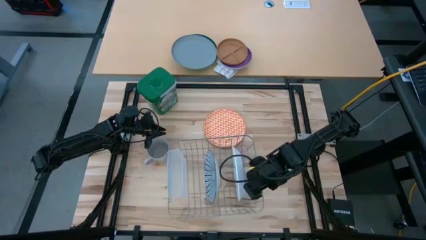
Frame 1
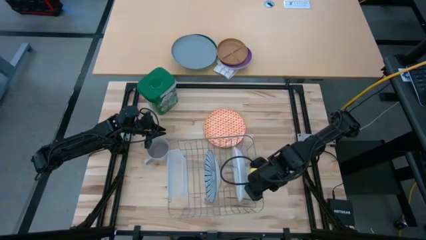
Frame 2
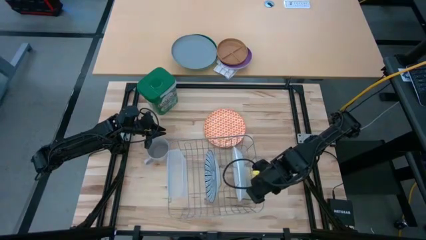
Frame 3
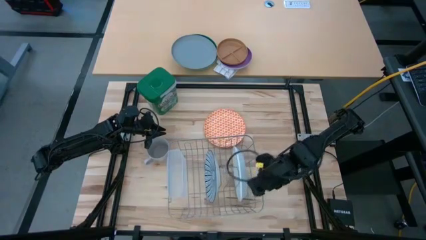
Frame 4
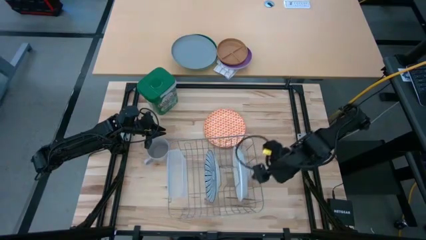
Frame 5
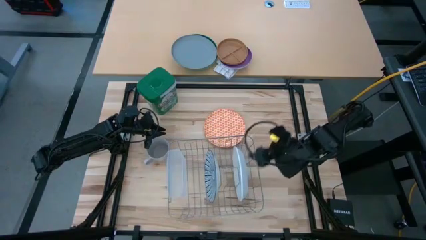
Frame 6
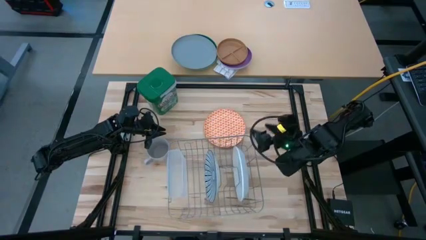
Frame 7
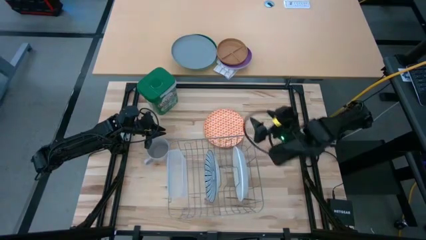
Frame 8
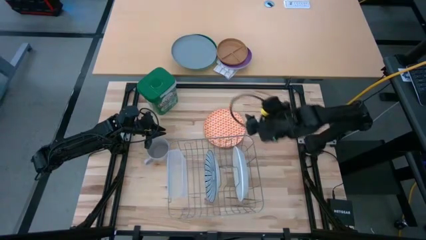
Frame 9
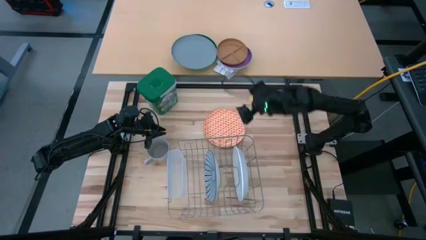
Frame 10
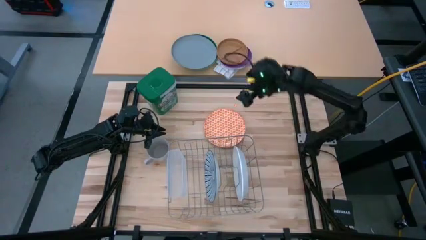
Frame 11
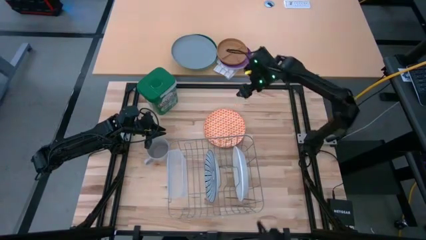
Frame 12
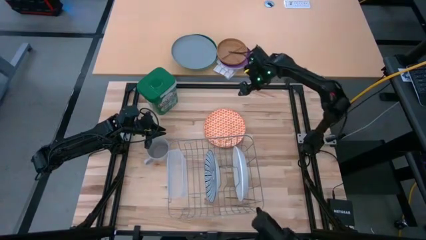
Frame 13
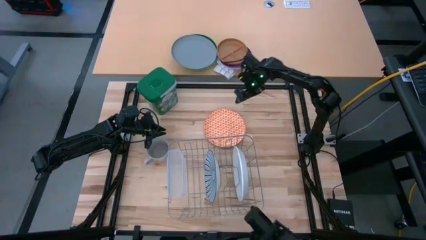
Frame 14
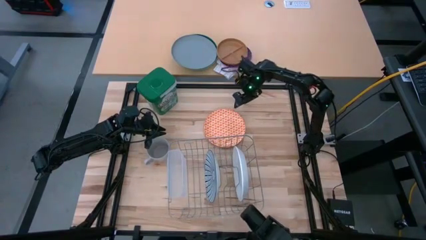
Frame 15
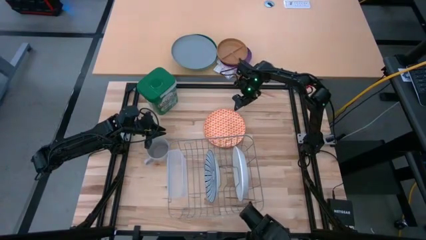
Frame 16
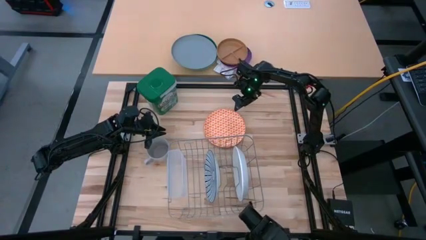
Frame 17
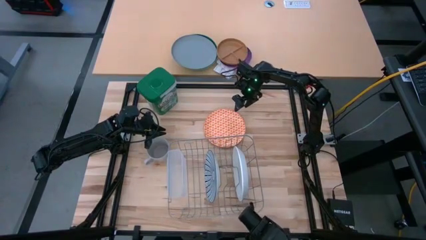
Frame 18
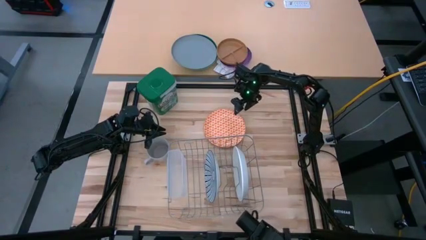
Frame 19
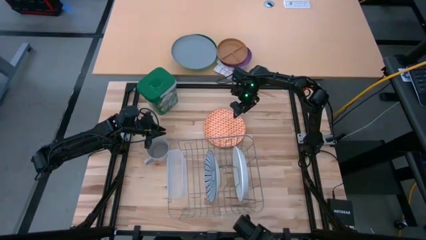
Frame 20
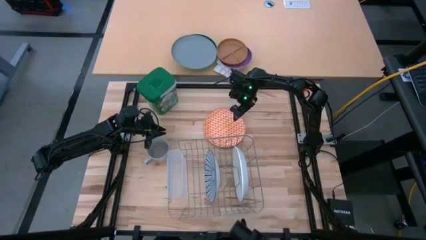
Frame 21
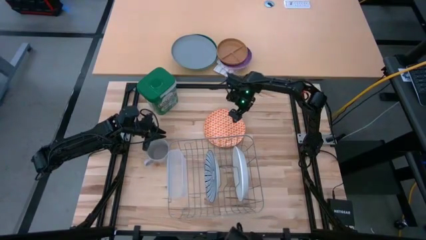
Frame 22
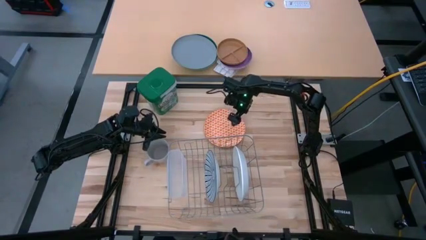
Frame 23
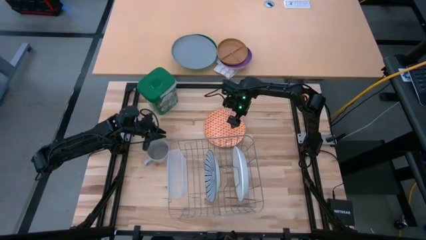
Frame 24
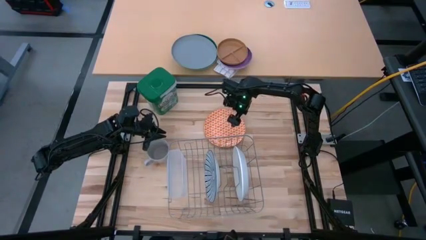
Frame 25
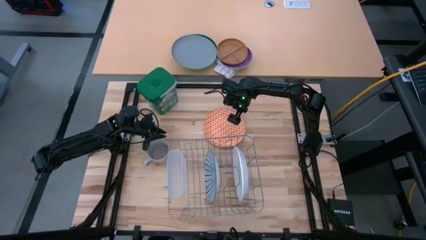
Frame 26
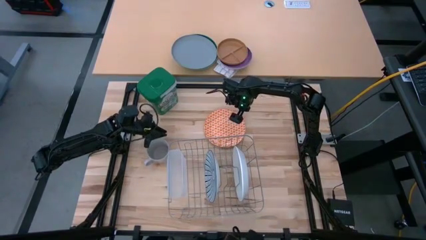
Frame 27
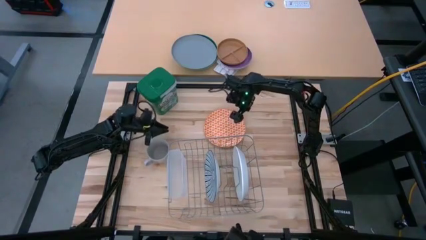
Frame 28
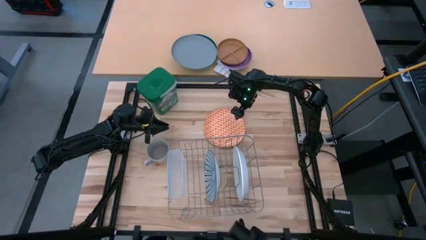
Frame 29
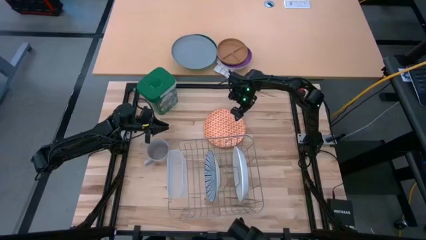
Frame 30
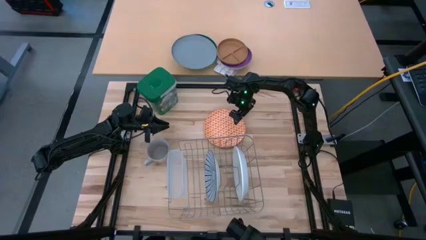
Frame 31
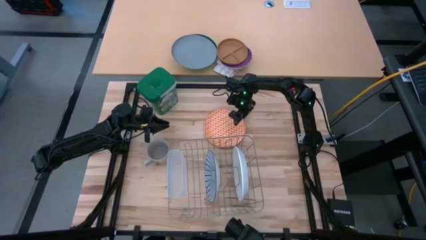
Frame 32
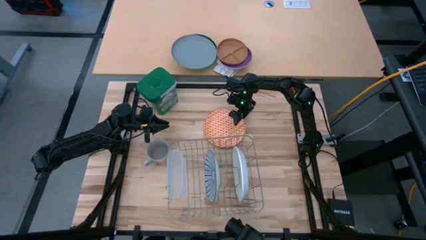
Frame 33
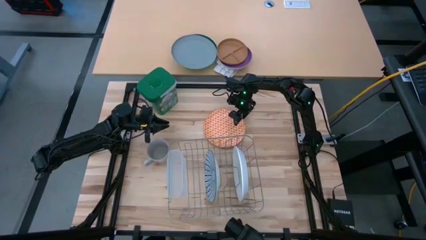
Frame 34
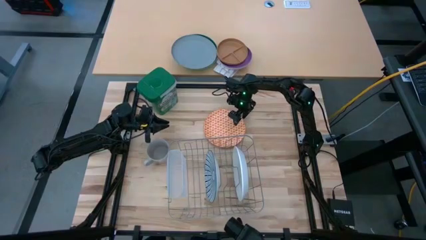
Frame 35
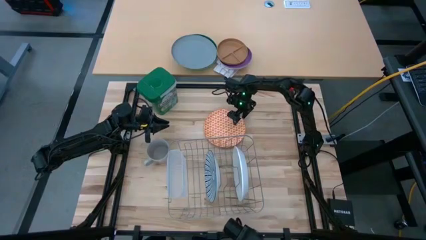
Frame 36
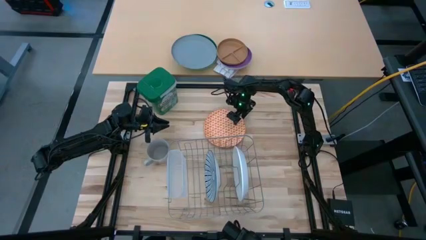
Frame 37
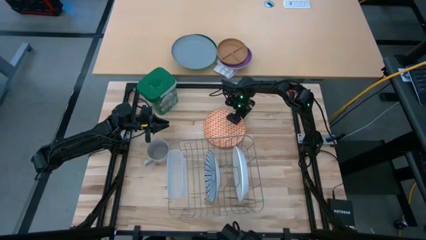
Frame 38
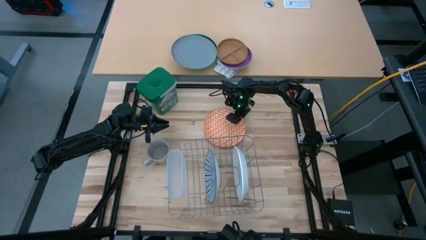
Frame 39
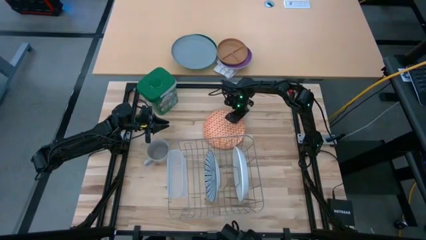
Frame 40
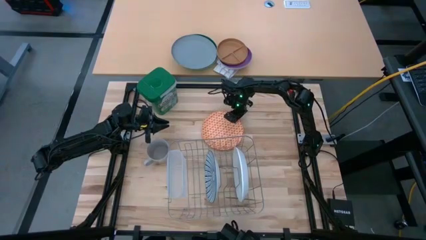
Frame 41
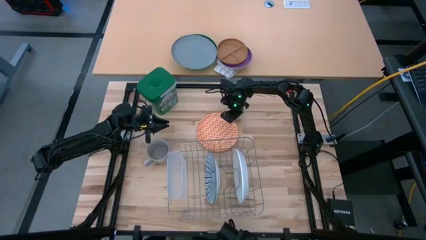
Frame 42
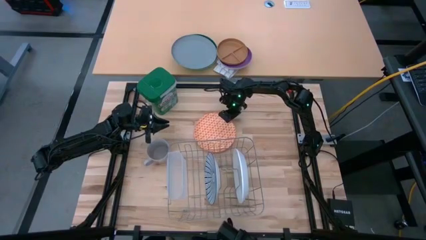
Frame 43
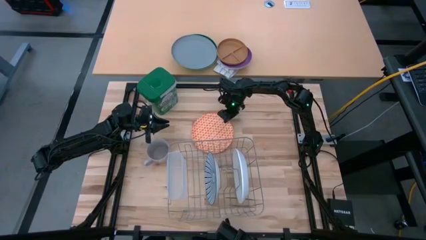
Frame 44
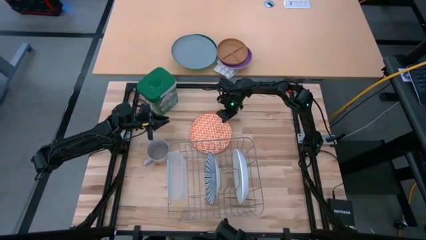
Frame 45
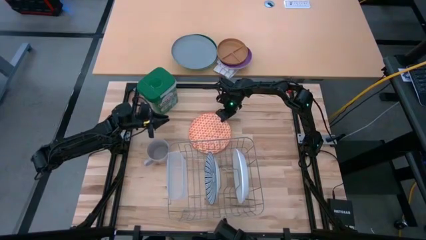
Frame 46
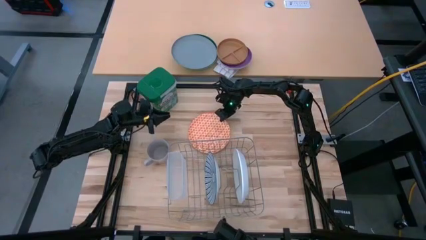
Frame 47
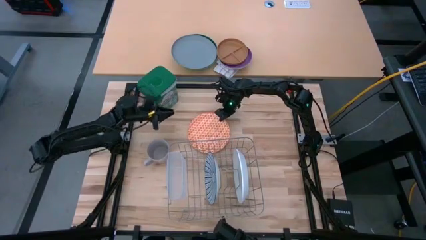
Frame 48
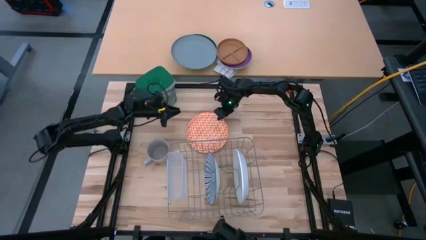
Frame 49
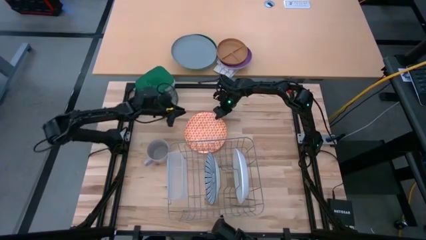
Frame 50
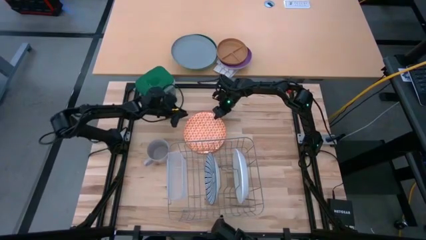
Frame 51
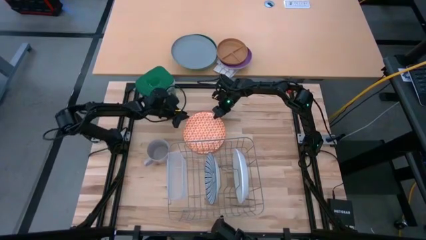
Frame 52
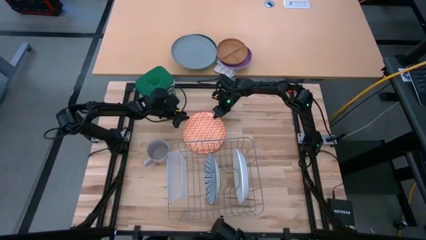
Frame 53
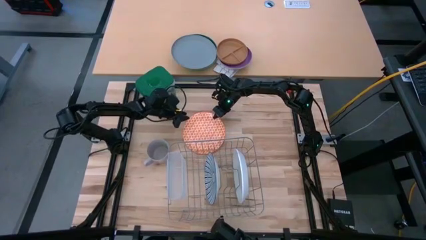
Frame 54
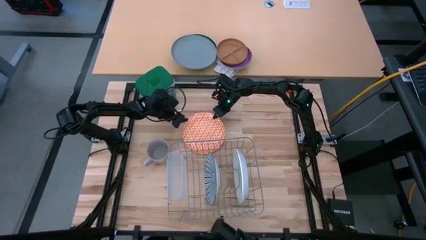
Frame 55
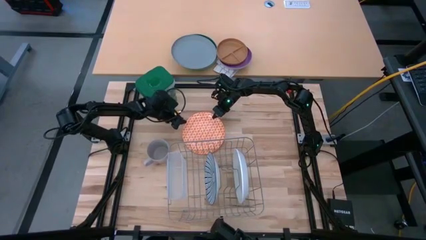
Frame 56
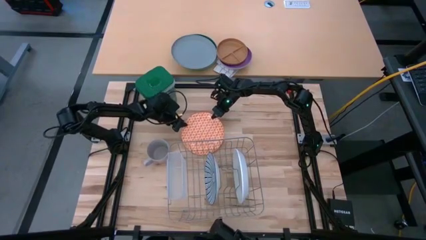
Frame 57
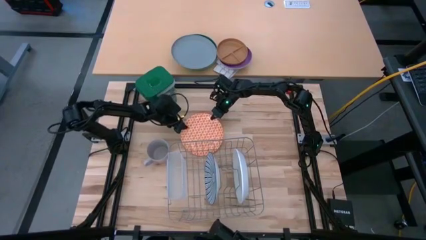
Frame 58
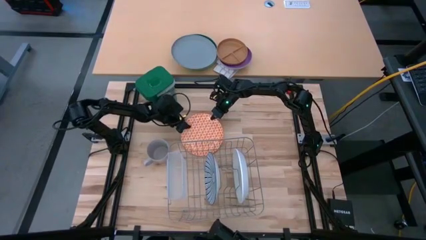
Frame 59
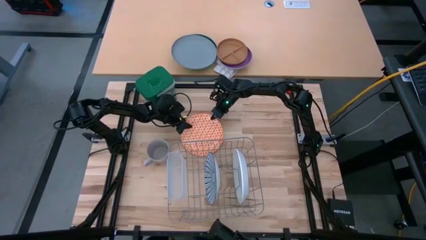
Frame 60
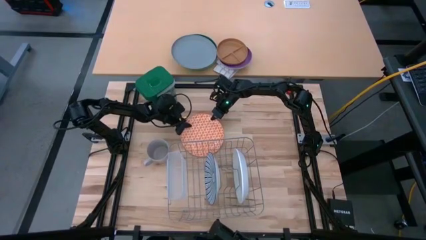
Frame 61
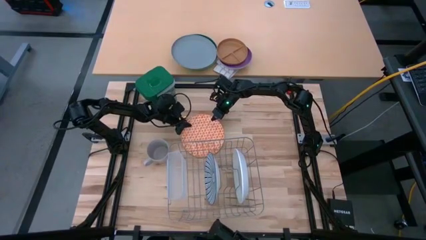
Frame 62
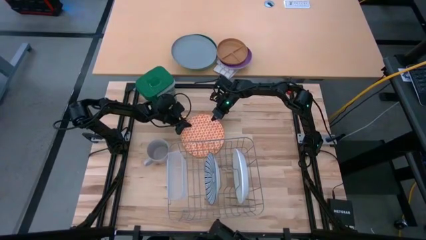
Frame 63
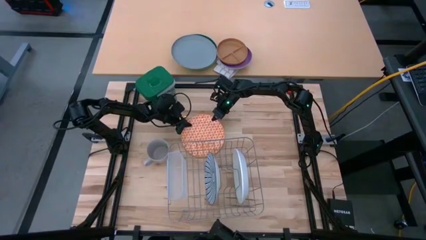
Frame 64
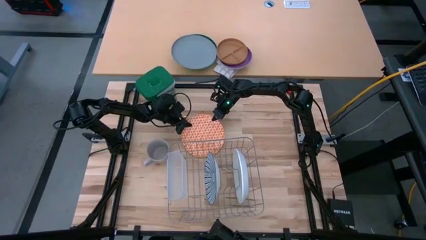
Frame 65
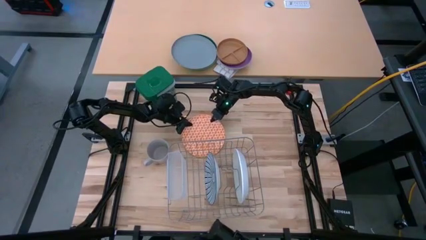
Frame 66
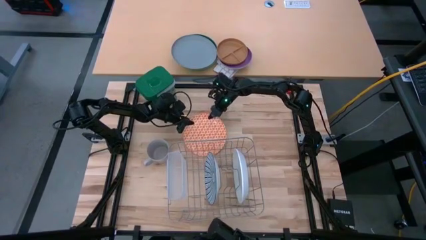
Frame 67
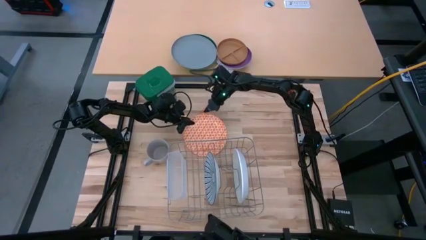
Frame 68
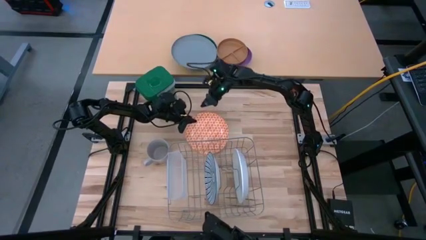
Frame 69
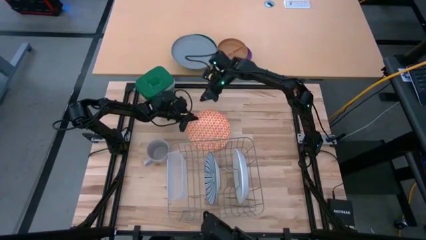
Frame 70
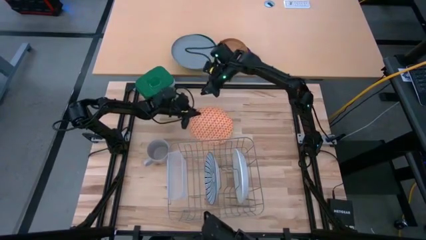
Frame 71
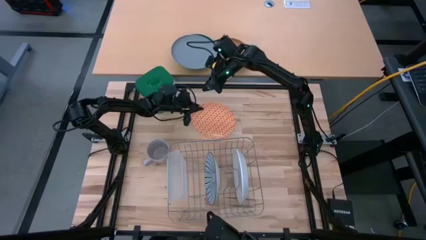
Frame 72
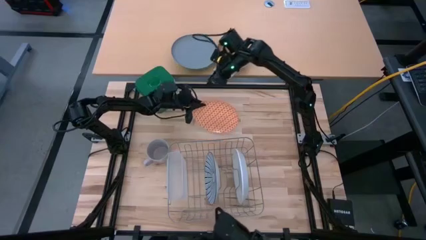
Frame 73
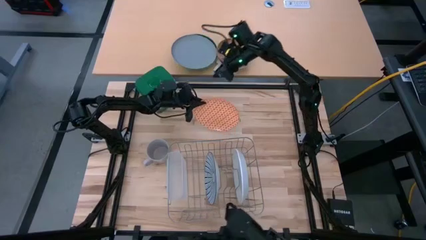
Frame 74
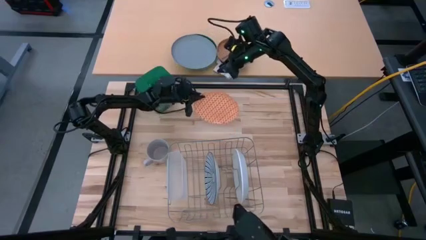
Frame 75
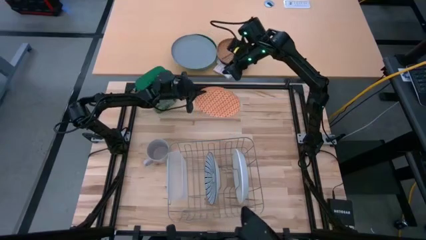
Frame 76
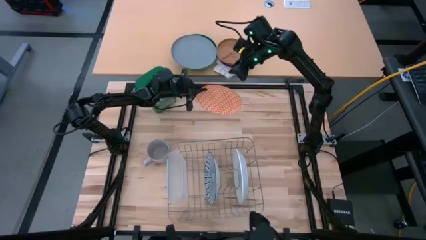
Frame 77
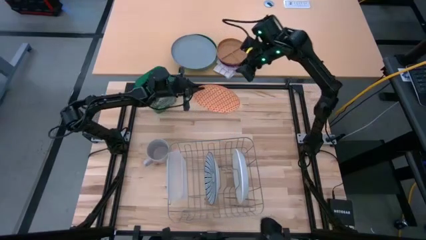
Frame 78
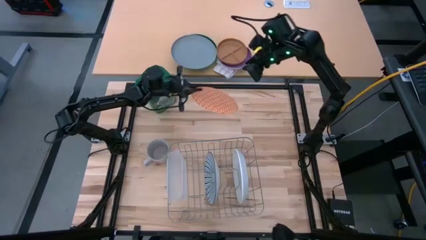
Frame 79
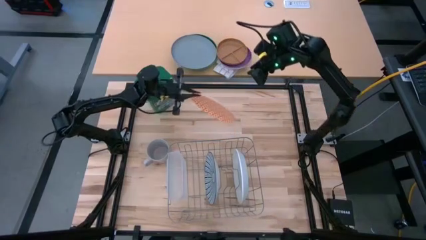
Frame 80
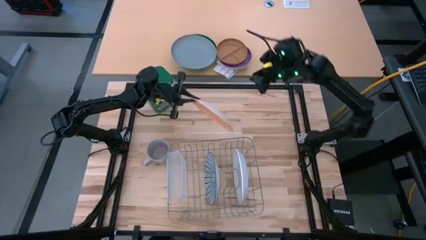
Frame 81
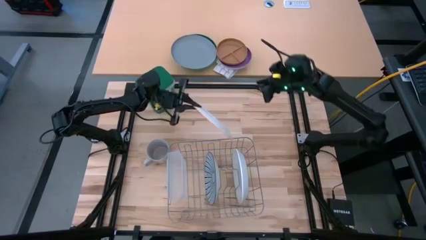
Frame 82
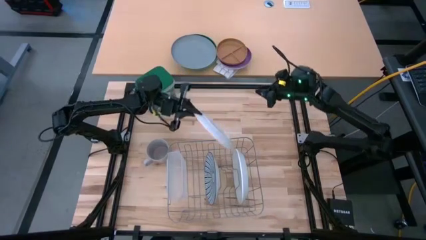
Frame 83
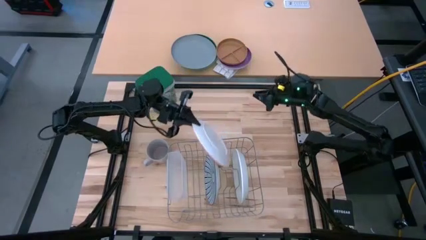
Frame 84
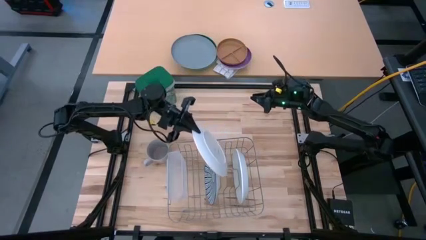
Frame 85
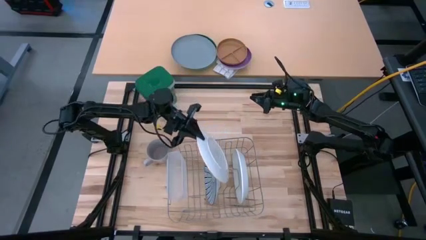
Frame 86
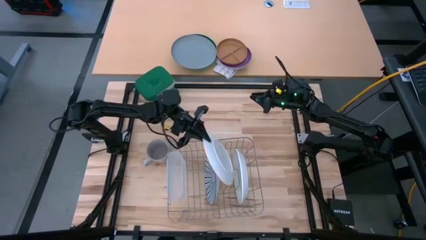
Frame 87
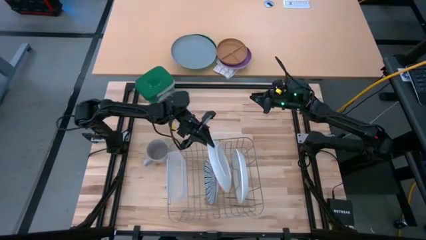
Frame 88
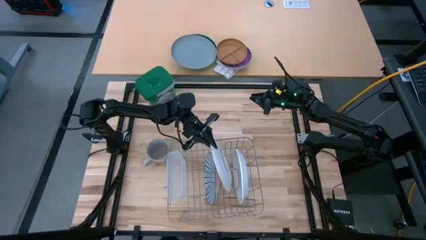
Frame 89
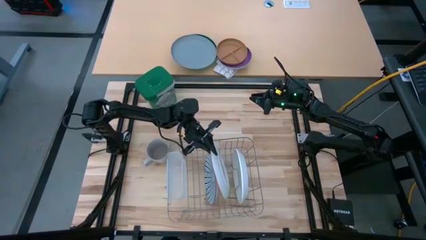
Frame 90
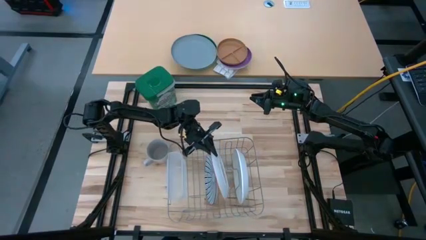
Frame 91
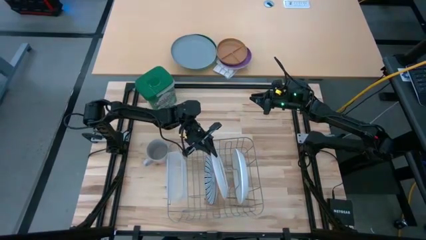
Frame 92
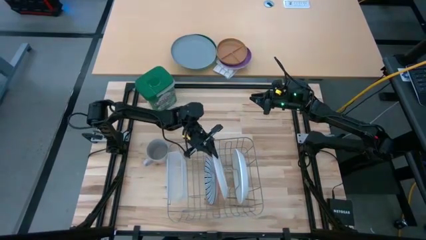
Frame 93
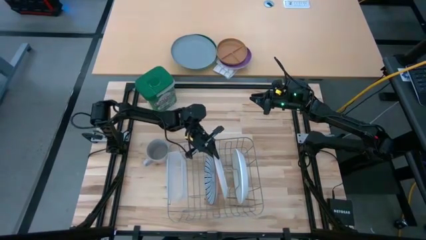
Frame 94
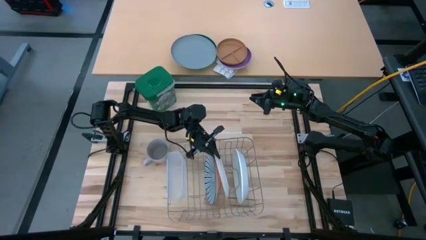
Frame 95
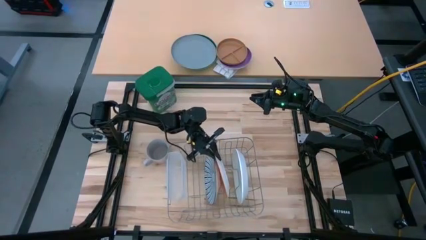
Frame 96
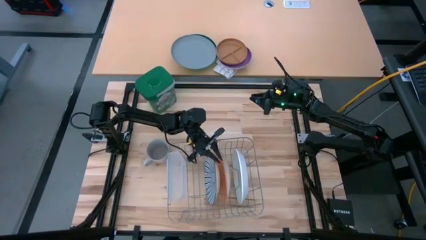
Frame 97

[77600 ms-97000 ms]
Task: Sort dishes
Put the orange plate in the dish rack
